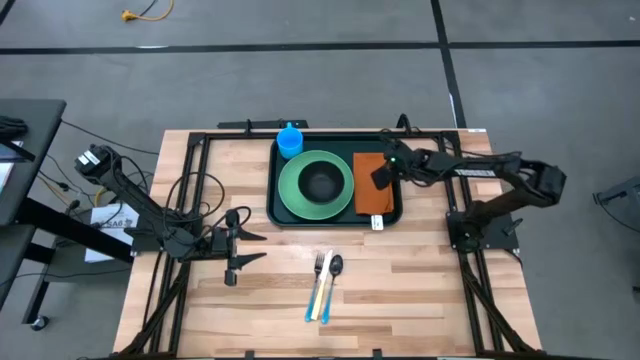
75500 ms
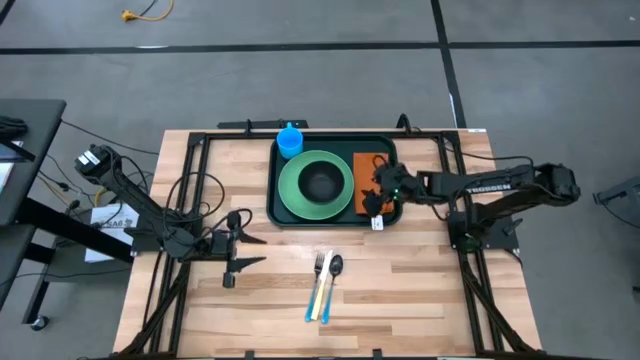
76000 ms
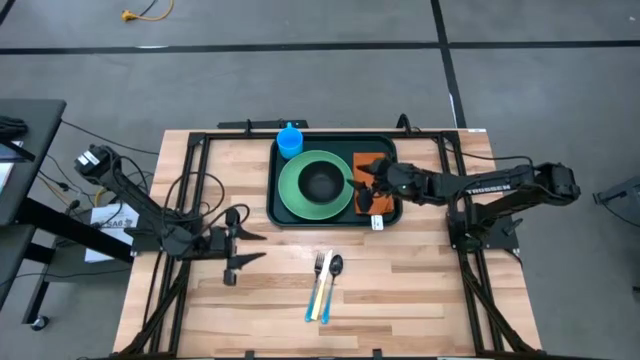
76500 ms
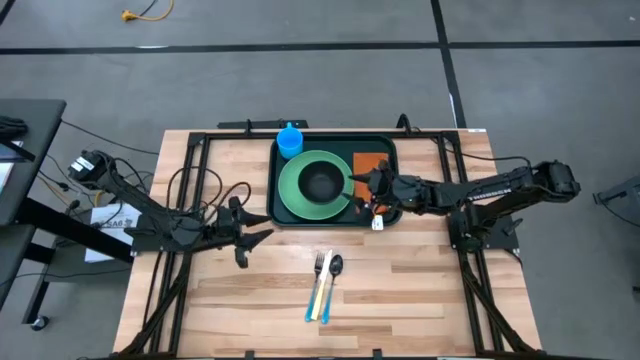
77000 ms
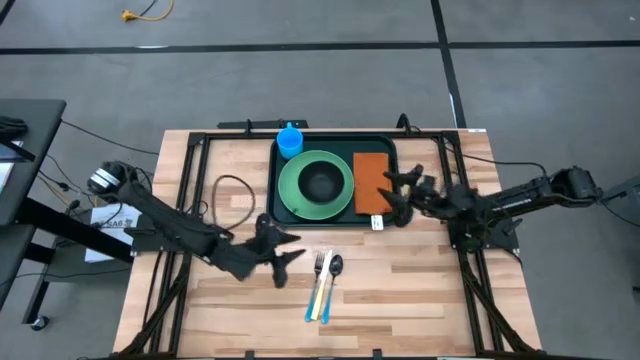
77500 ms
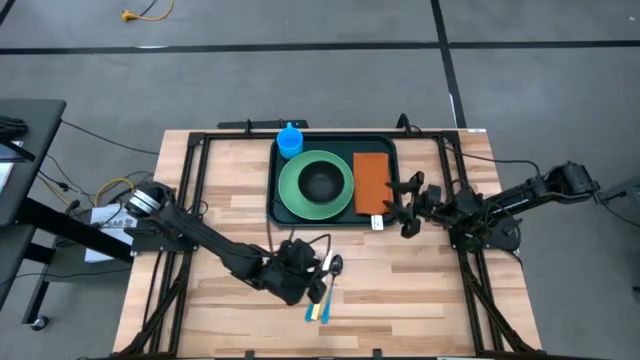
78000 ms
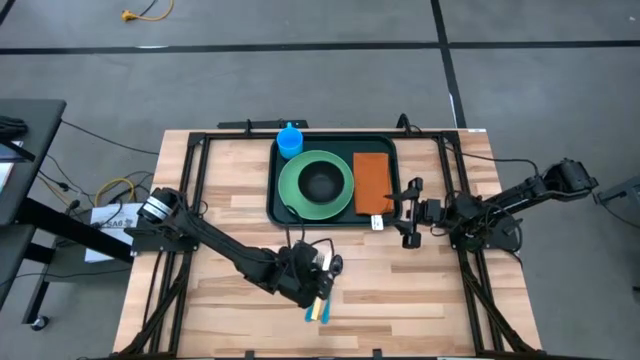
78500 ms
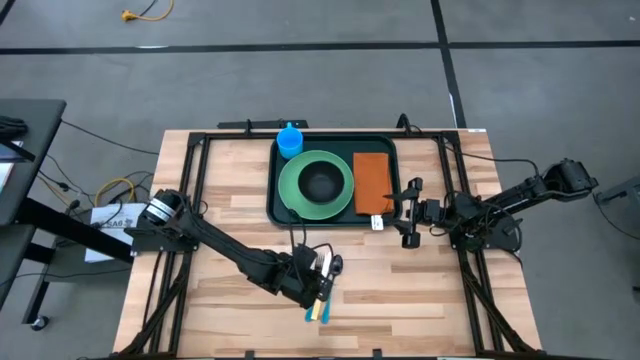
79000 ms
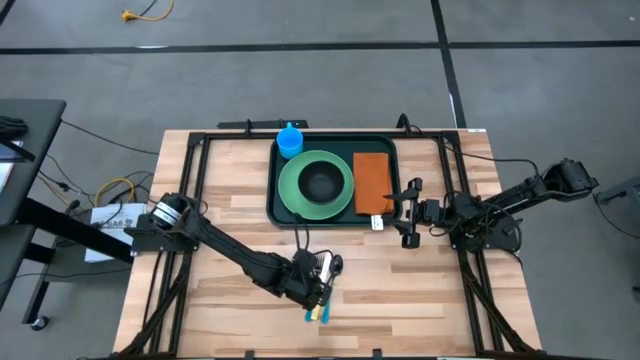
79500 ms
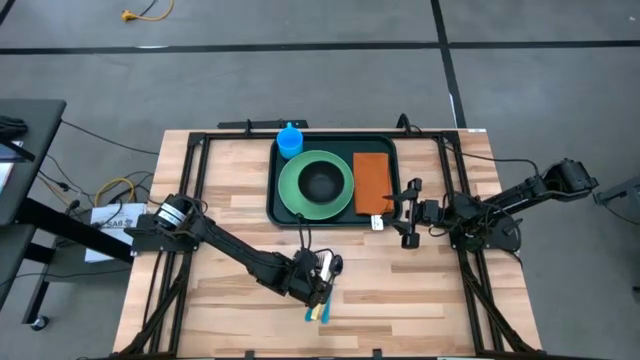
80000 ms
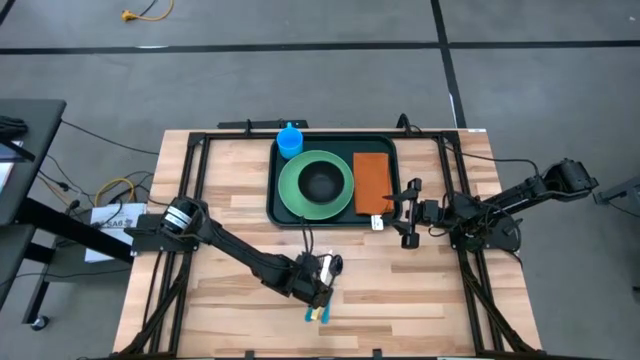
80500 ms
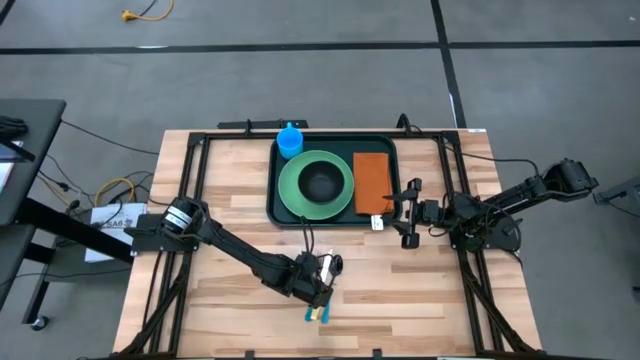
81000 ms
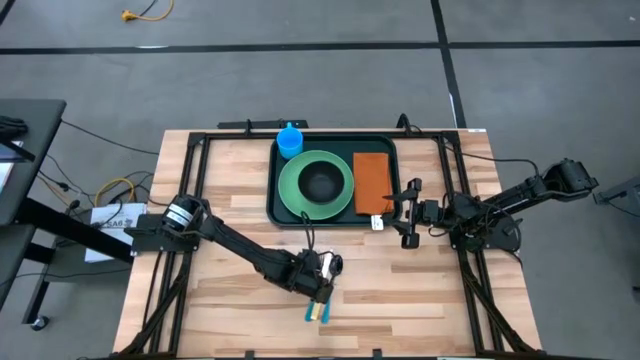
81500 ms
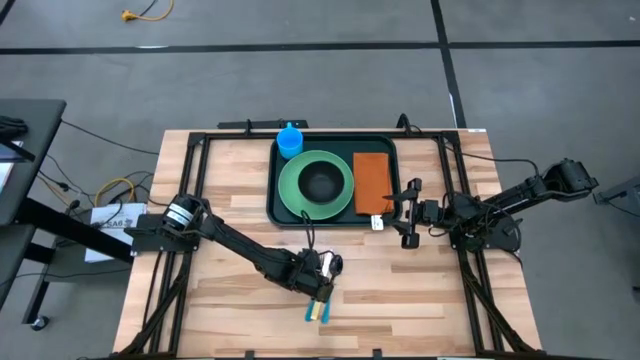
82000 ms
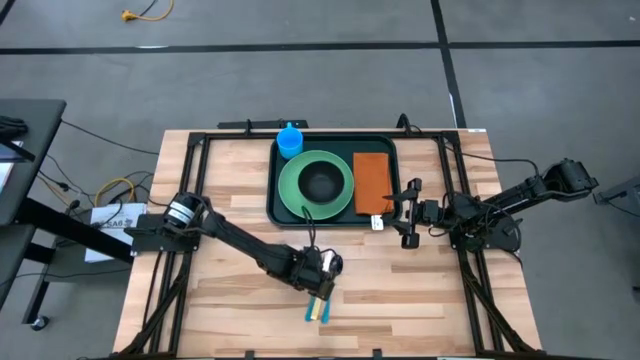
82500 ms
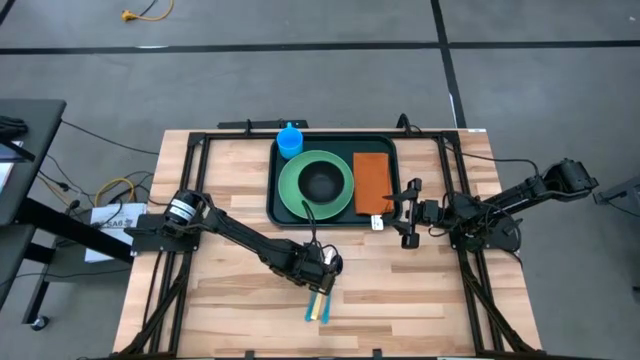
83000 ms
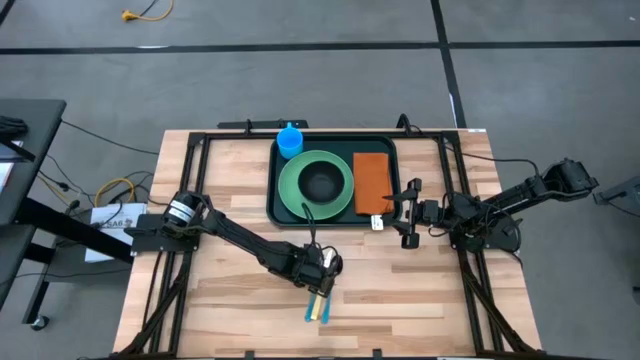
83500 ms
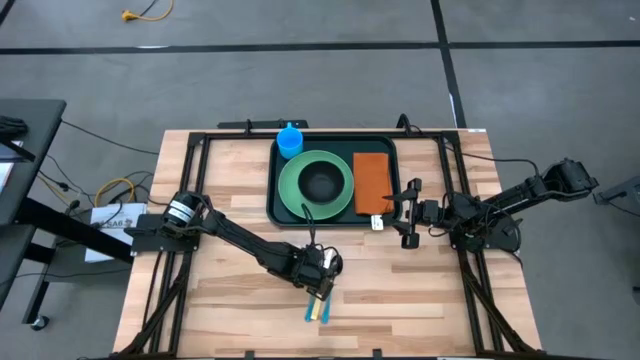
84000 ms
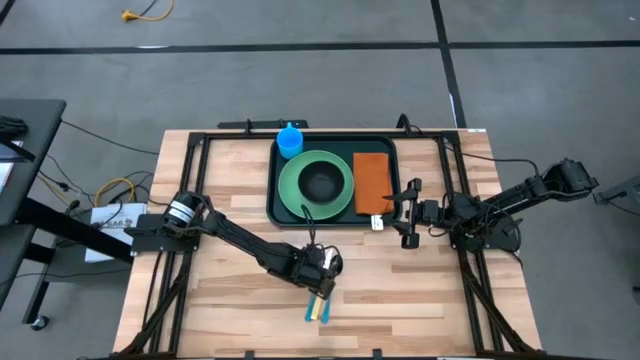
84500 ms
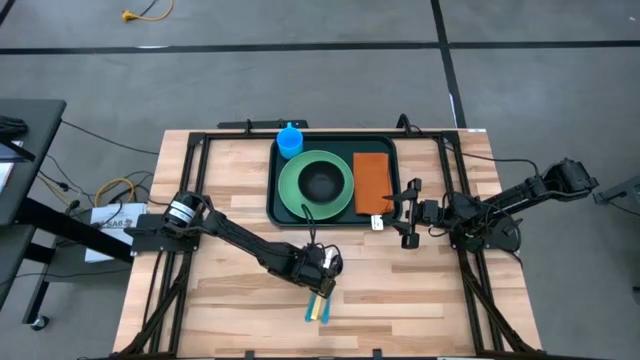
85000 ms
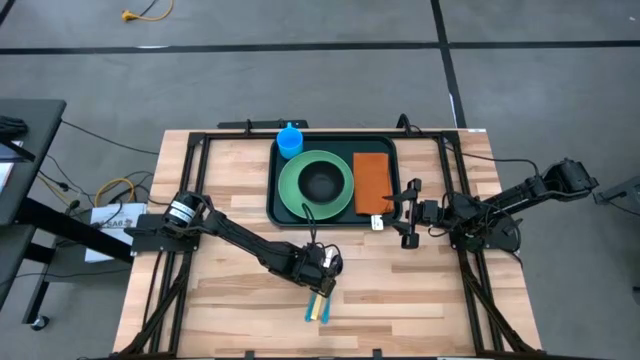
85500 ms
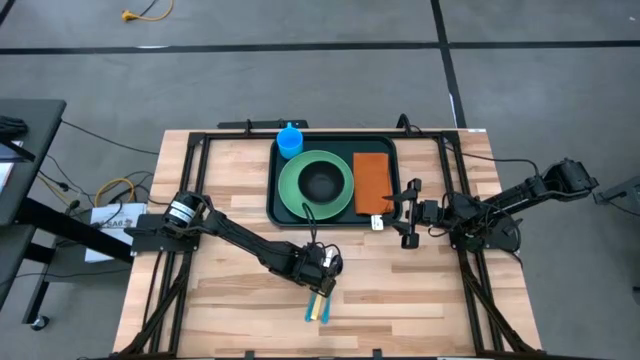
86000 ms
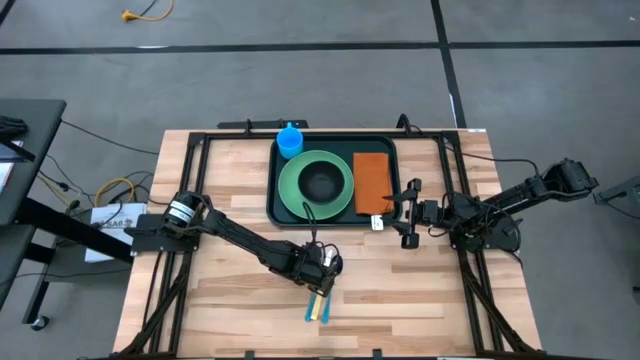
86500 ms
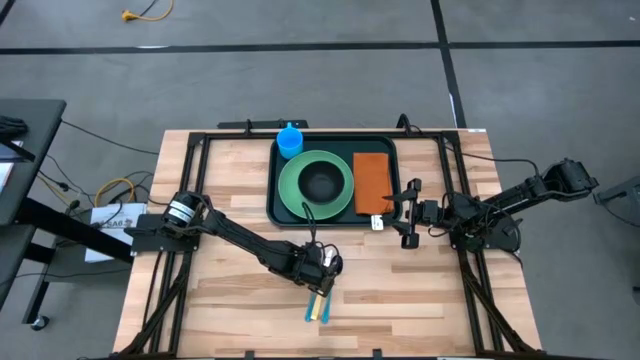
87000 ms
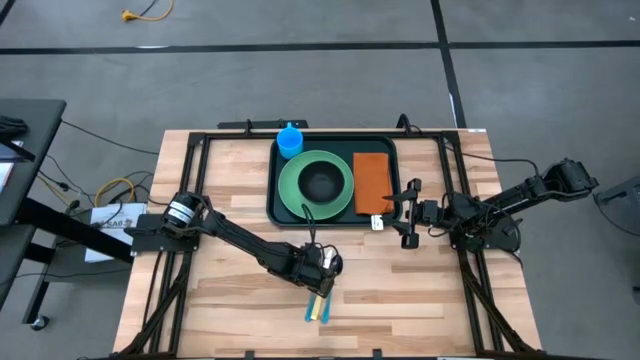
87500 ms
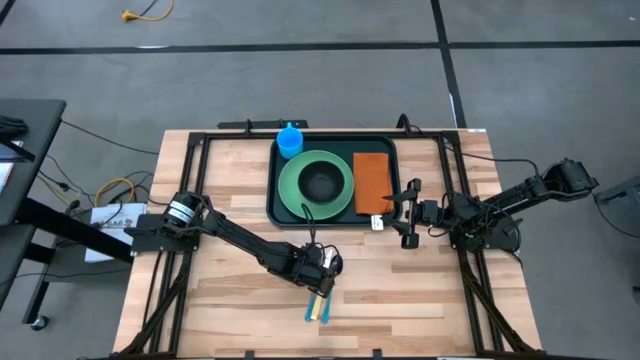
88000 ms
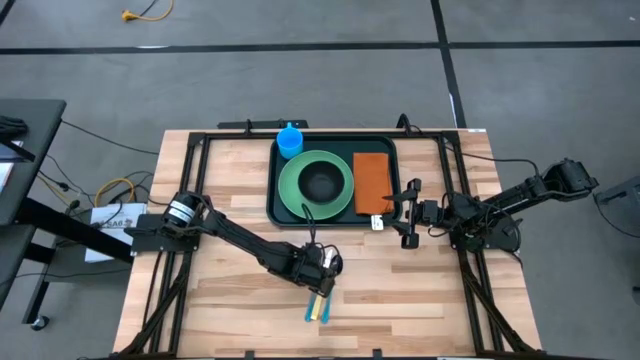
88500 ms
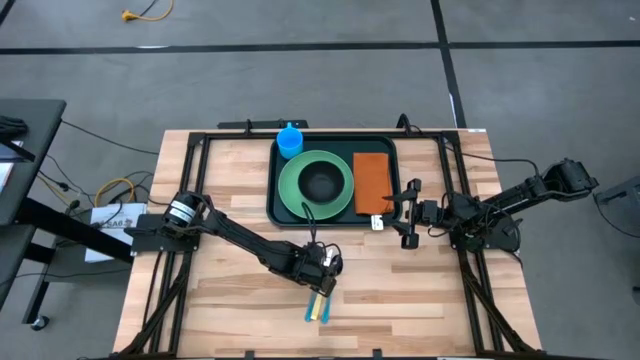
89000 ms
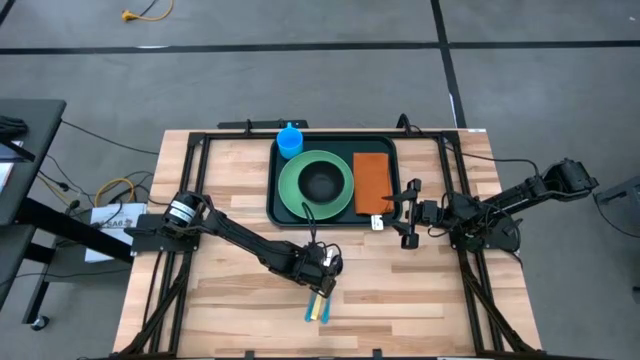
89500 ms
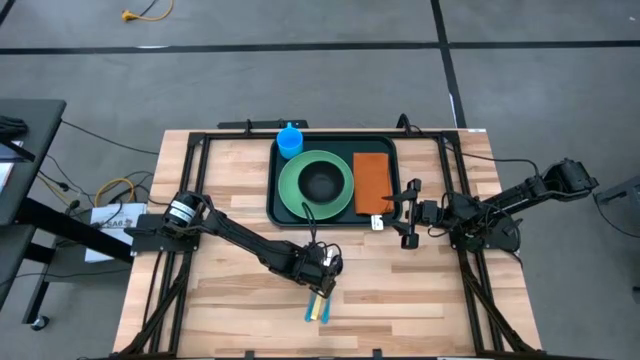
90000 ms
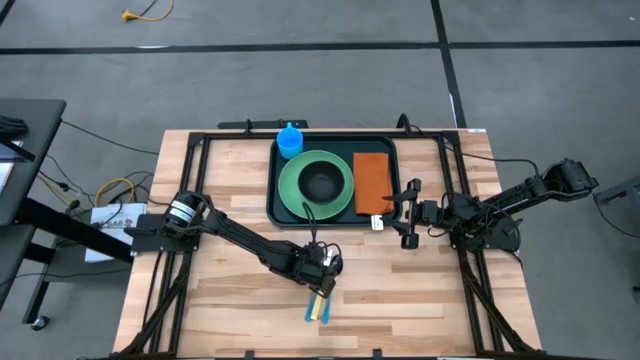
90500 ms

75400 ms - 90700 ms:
Task: Set up tray
Put the blue fork on the brown table napkin on the black serving tray

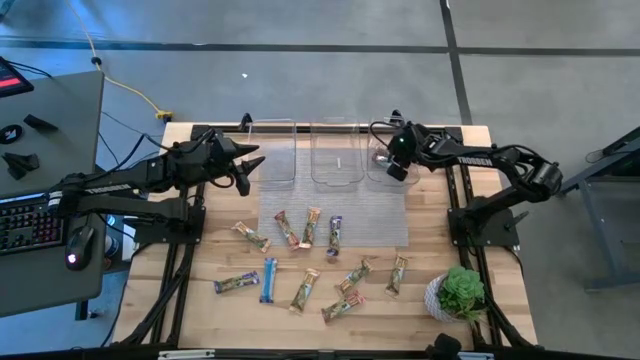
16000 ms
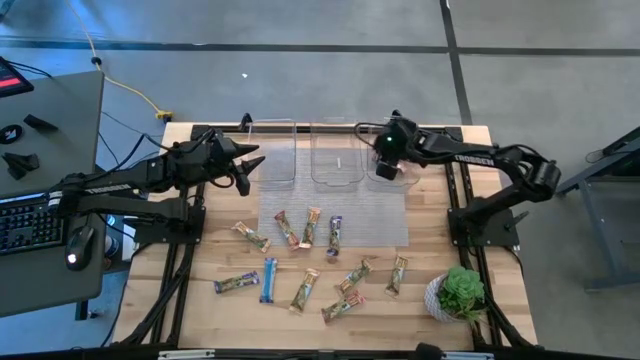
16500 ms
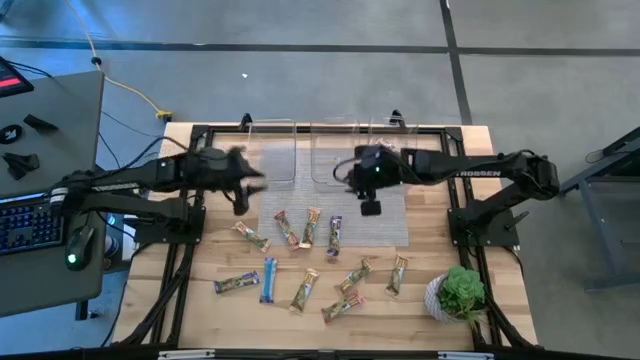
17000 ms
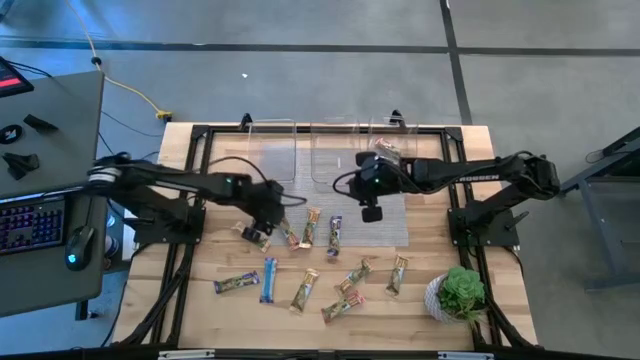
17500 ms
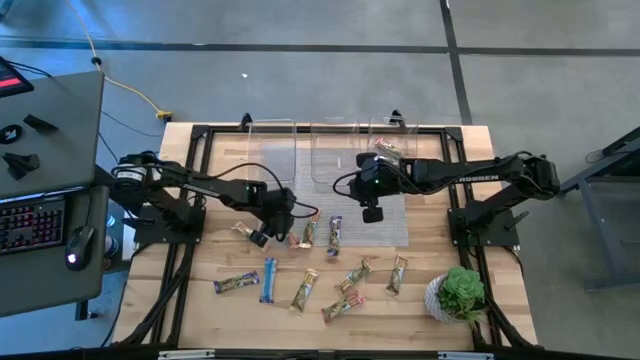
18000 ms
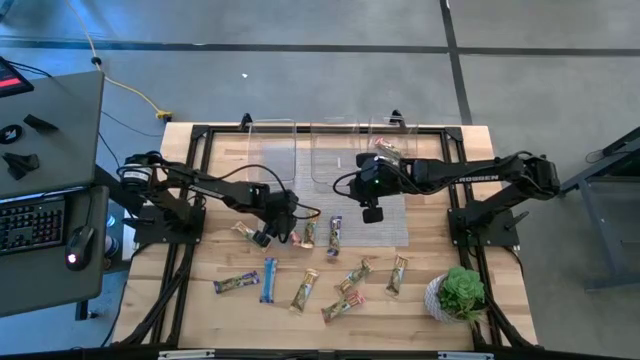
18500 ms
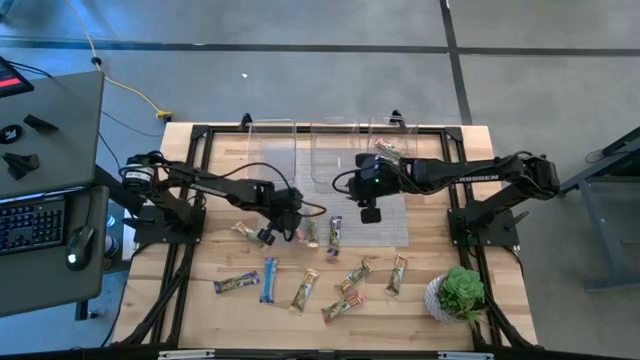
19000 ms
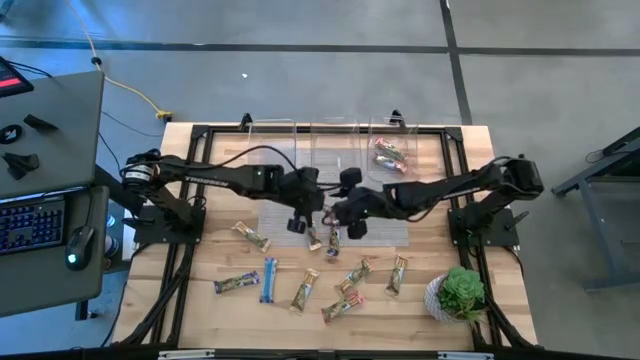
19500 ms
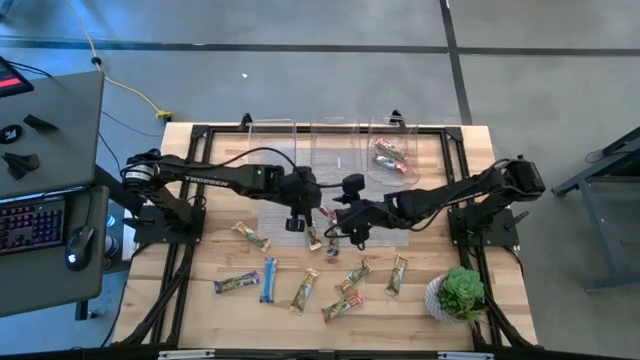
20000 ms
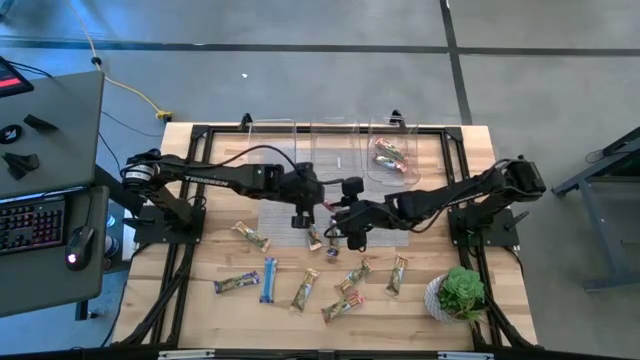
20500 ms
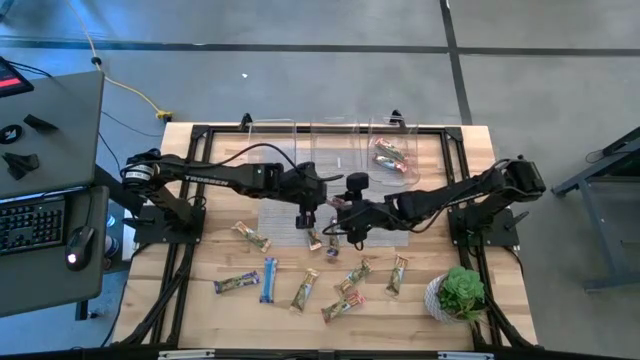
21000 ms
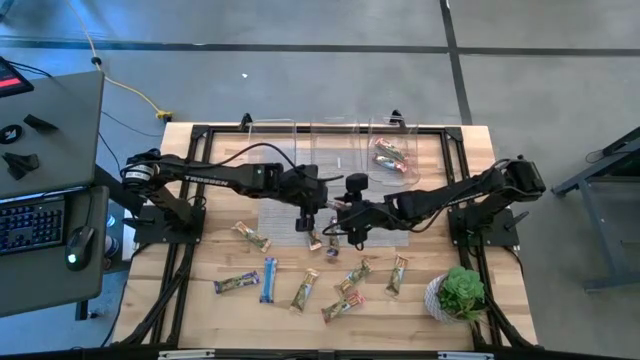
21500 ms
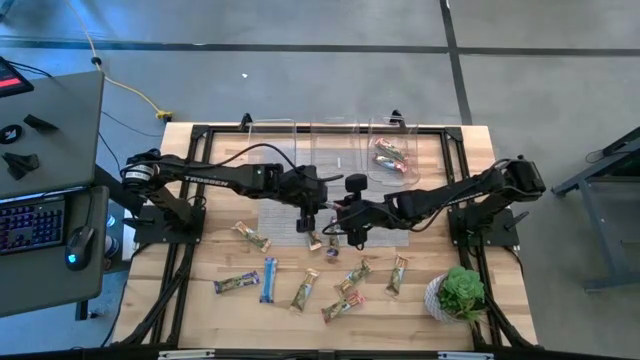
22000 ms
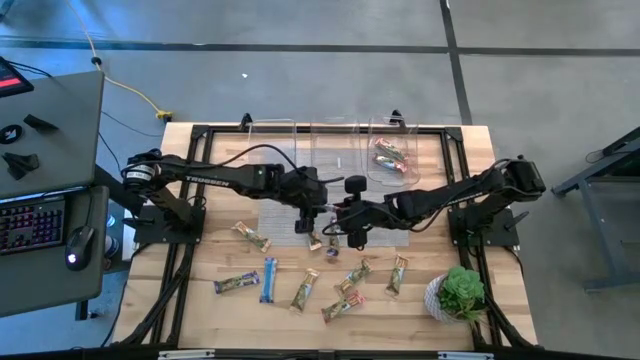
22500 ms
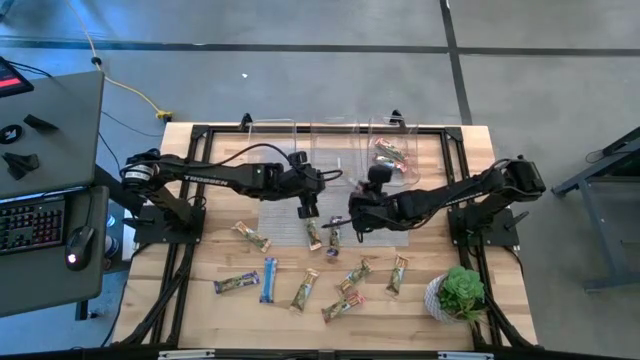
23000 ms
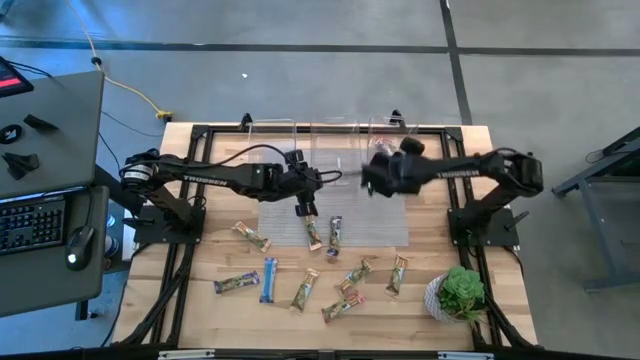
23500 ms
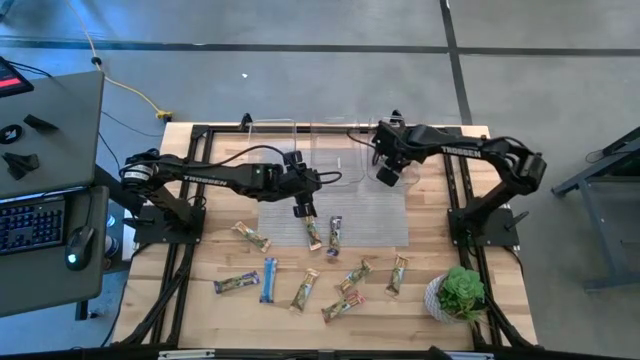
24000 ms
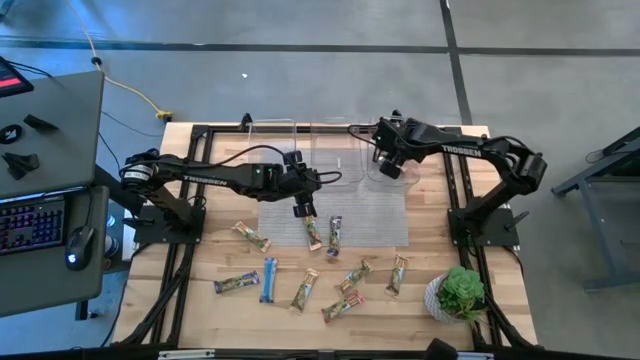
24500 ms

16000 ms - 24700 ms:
Task: Pick and place Granola Bars by type
Put the red granola bar into the right transparent bin
